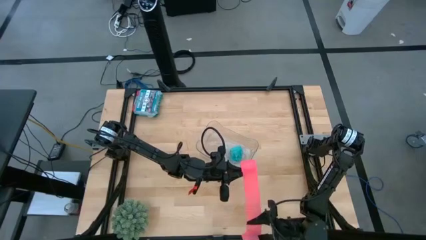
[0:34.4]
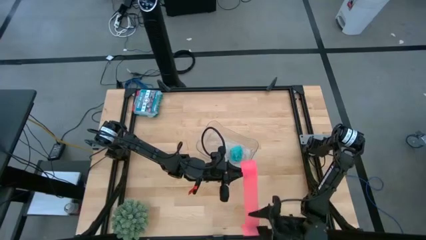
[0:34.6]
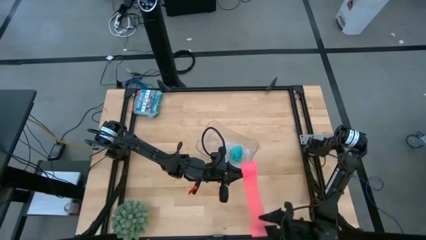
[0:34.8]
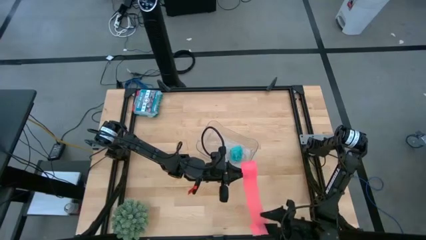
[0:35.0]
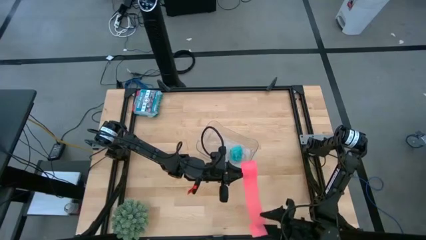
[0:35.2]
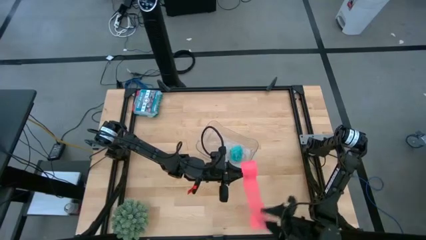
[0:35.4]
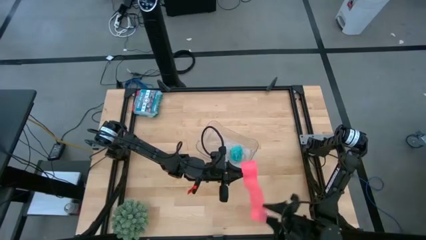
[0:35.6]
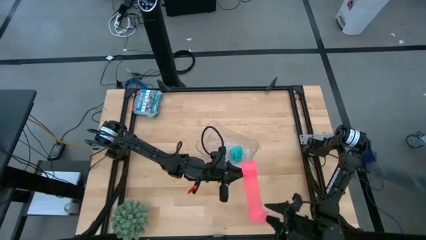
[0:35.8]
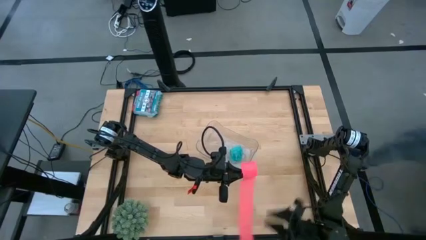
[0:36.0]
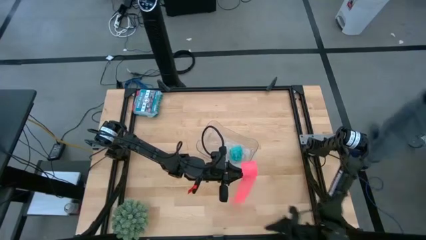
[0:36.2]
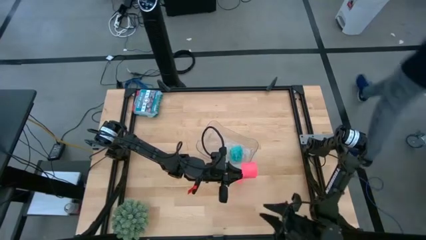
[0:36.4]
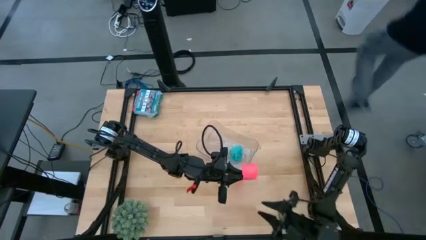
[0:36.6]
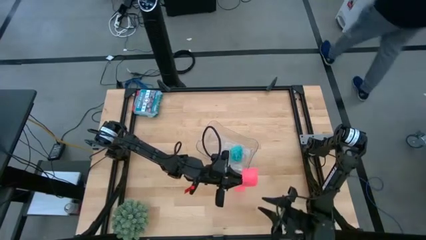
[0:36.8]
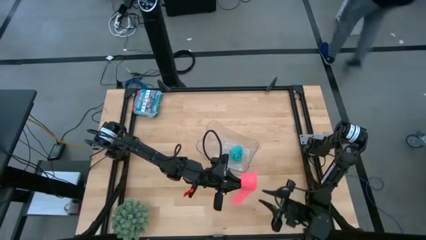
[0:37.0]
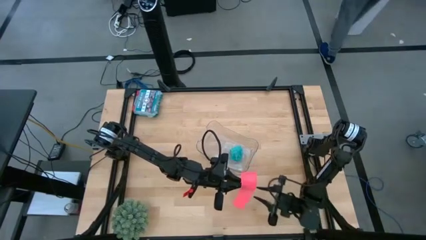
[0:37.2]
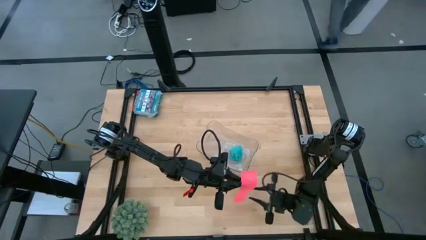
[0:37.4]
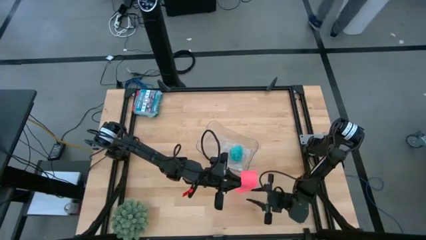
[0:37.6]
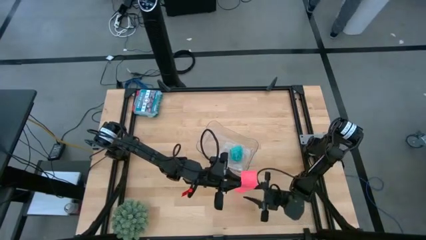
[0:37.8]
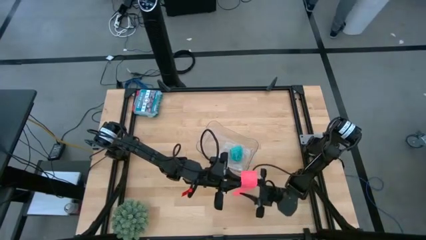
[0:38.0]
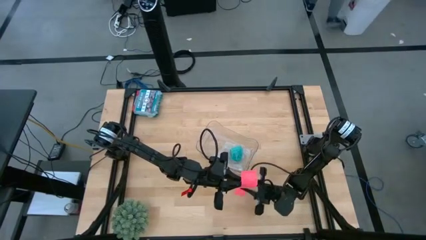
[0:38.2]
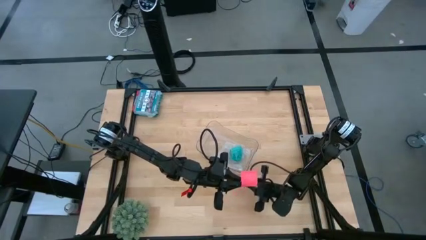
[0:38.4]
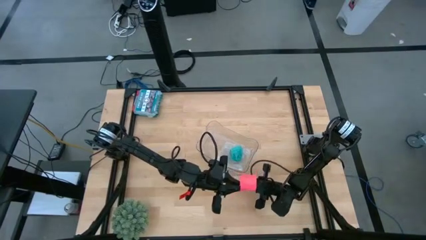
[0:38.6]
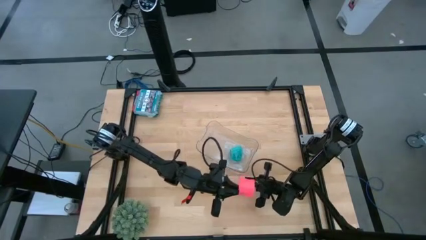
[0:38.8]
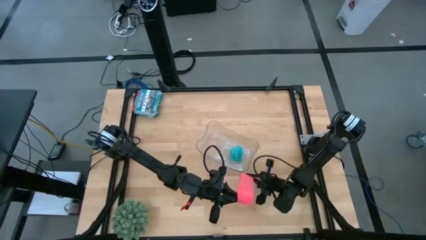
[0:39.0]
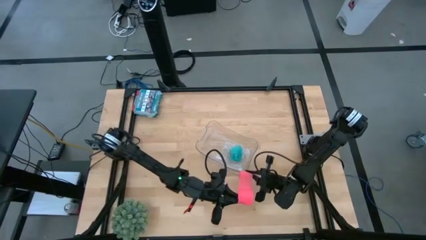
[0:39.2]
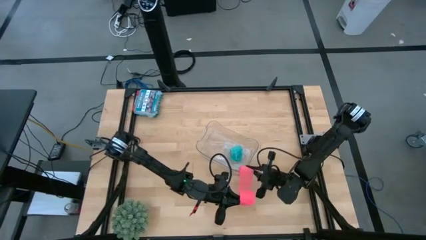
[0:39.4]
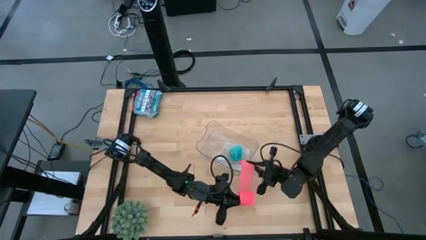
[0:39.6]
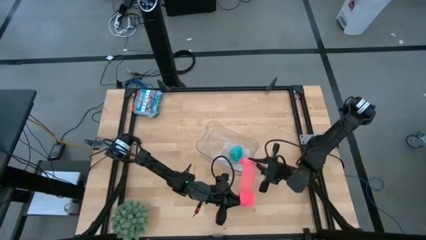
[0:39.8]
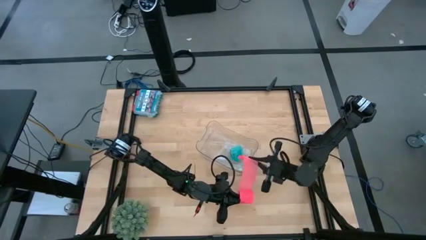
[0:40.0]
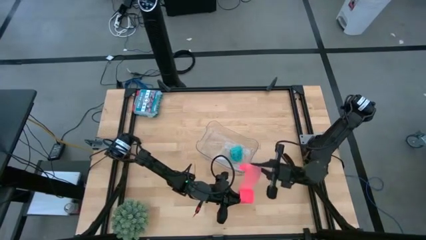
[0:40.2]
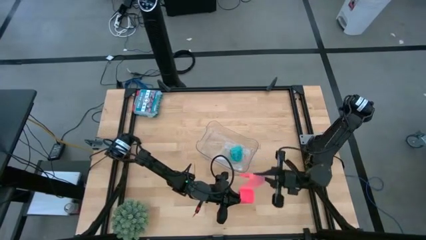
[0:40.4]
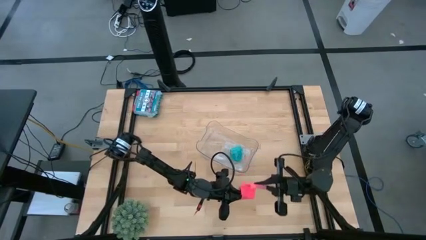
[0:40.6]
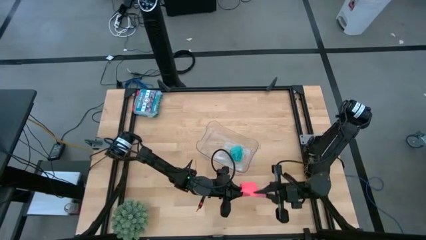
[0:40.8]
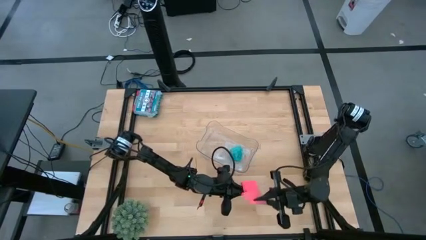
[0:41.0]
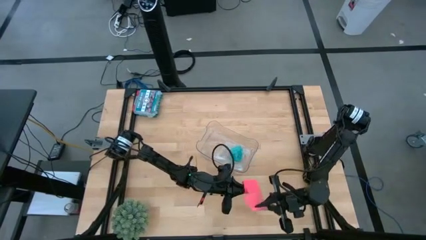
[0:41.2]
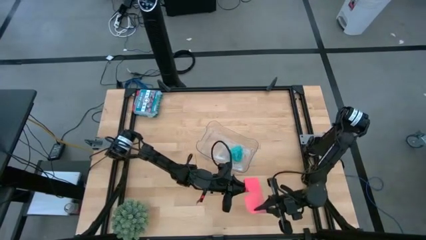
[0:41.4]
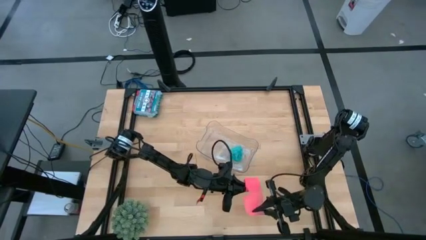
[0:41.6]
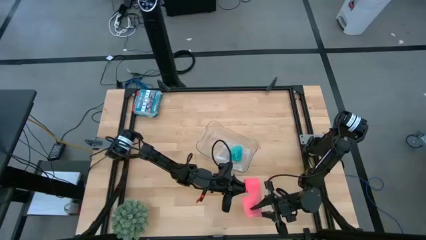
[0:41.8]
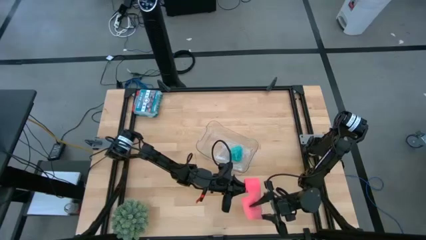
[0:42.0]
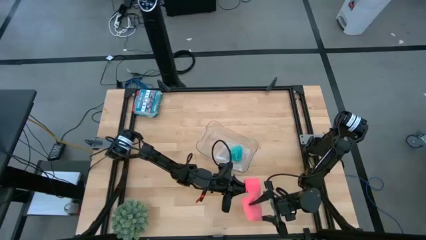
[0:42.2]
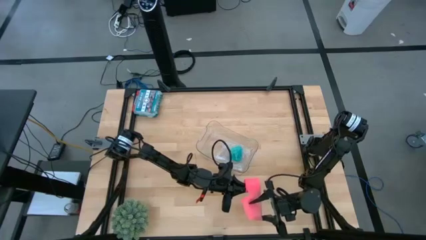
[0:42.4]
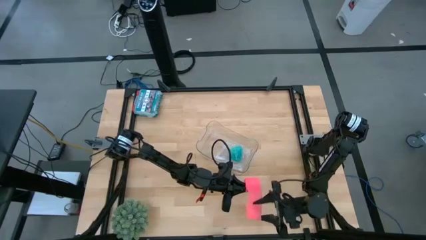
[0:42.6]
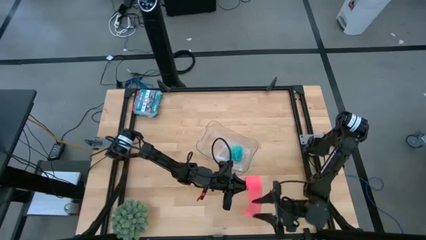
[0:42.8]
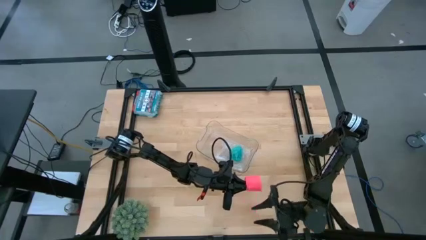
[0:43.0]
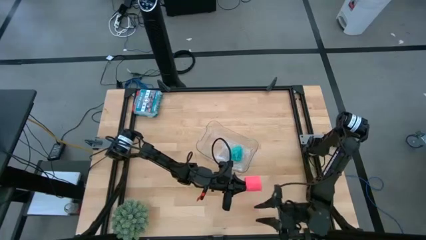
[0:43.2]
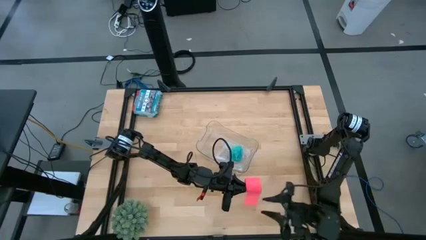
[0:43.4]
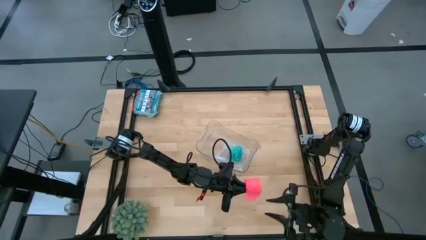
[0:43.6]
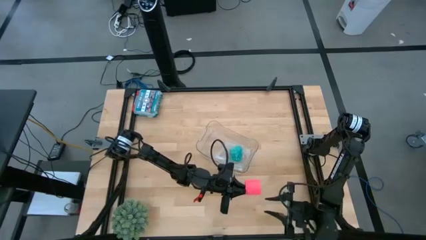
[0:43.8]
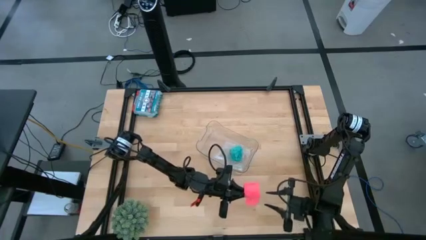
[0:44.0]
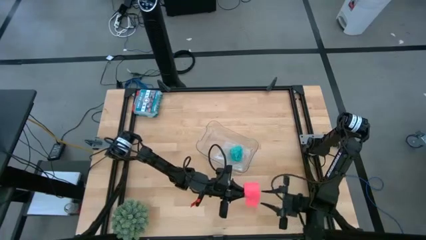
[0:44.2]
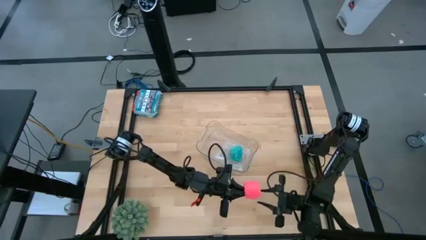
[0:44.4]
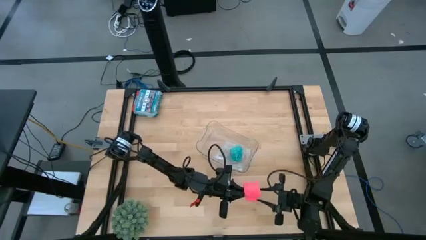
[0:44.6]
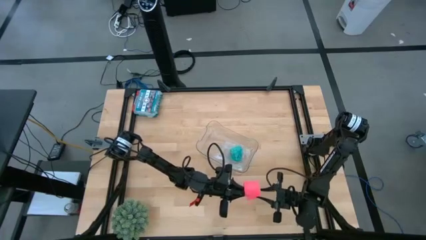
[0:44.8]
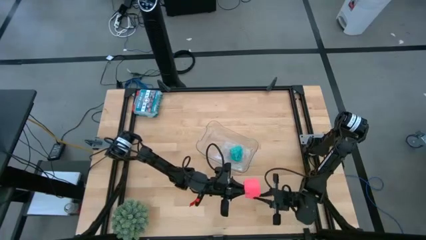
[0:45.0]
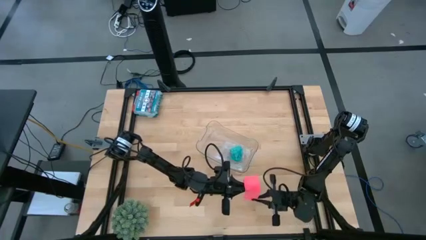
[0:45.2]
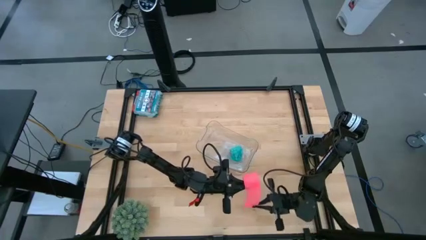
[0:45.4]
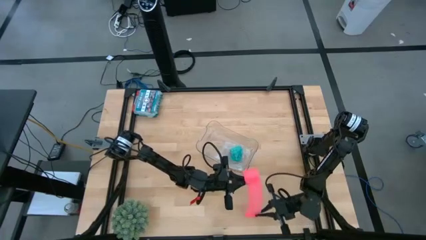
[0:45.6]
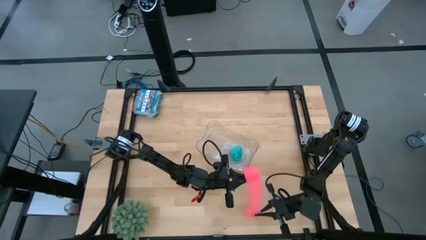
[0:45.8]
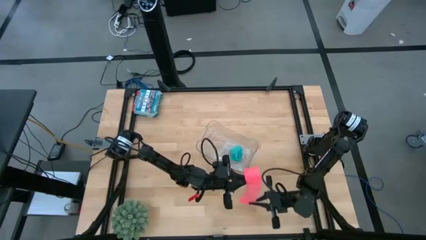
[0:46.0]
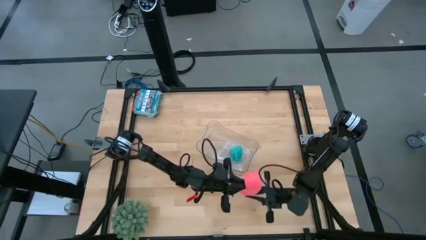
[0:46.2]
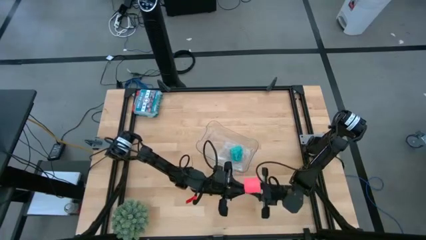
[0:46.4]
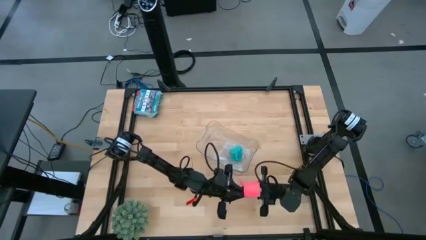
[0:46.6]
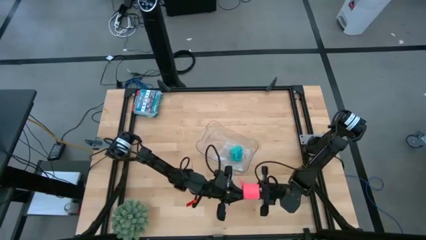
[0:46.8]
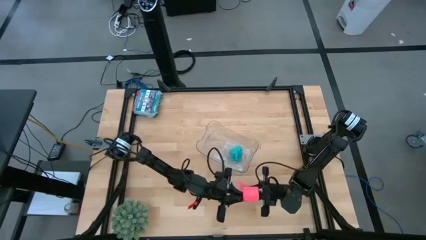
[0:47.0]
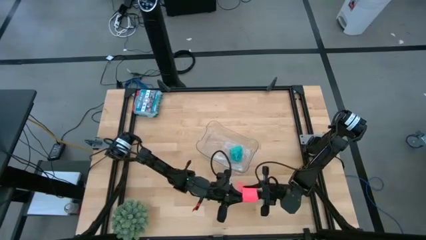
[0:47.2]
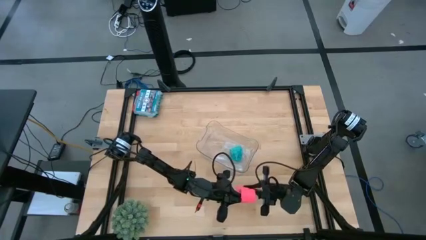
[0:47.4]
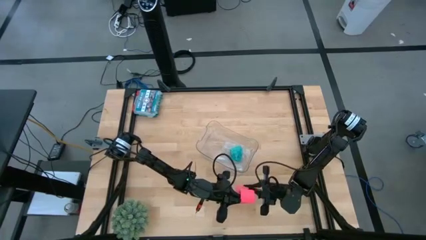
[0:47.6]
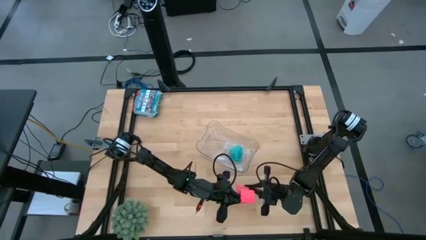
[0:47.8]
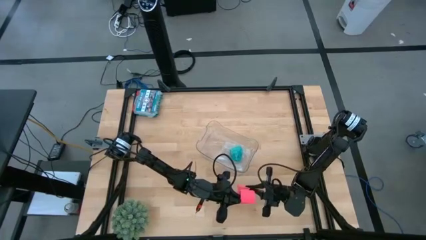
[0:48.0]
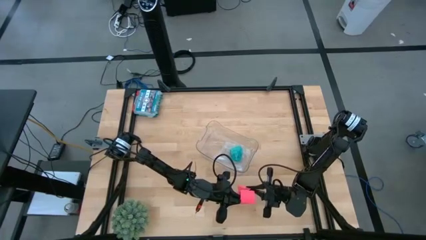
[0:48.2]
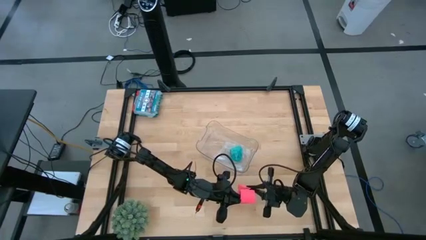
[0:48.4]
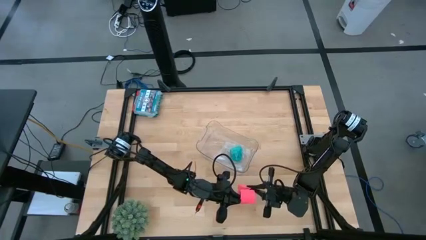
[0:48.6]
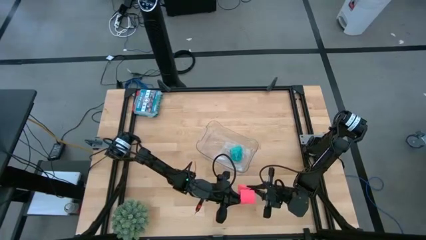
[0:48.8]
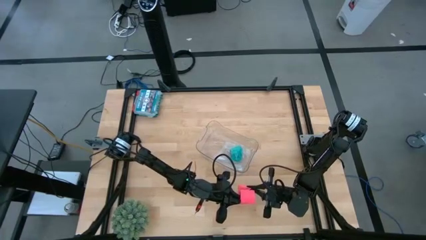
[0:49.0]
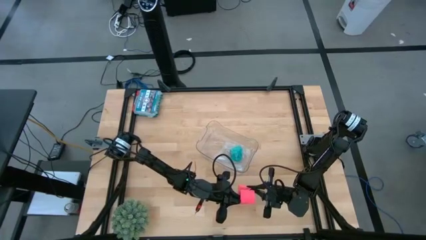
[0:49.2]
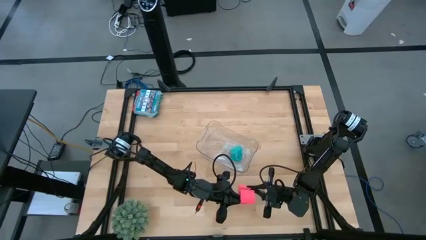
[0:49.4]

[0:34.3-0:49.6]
Task: Roll bandage
Roll the pink bandage
